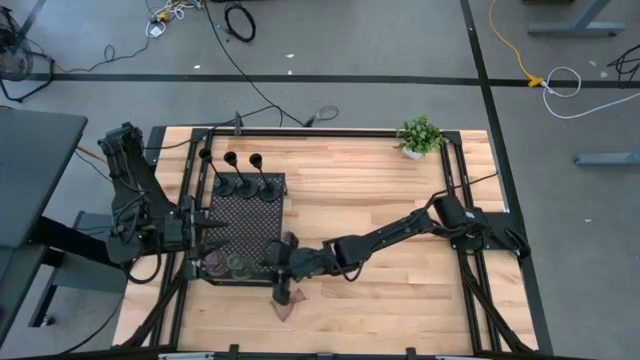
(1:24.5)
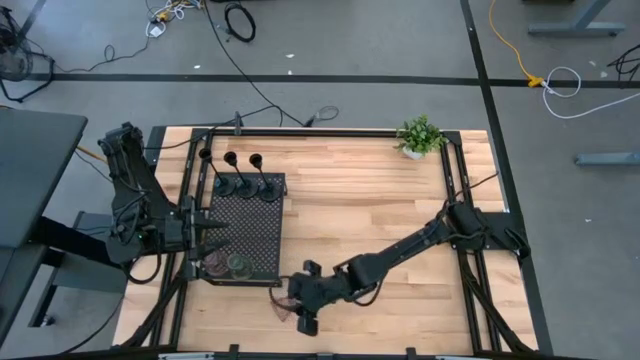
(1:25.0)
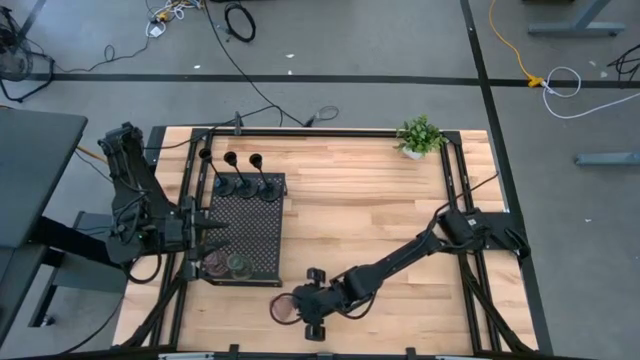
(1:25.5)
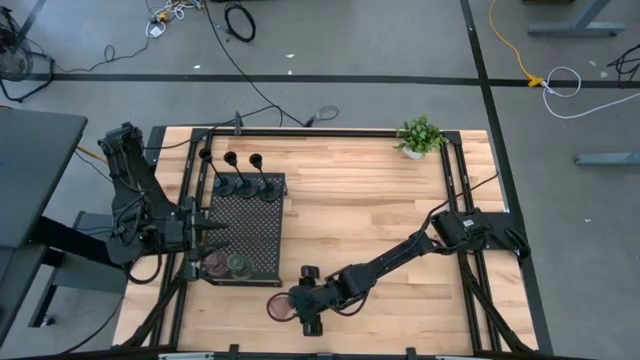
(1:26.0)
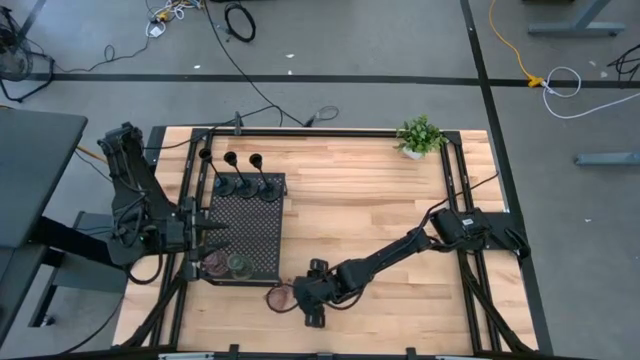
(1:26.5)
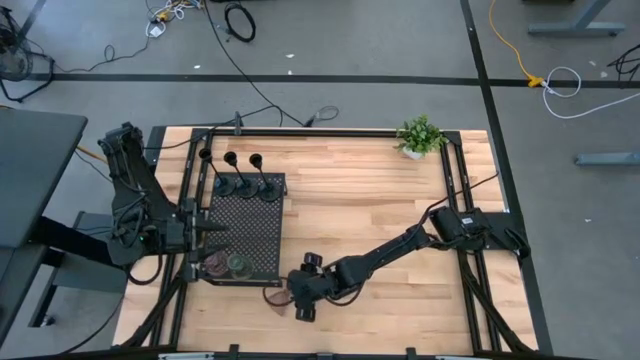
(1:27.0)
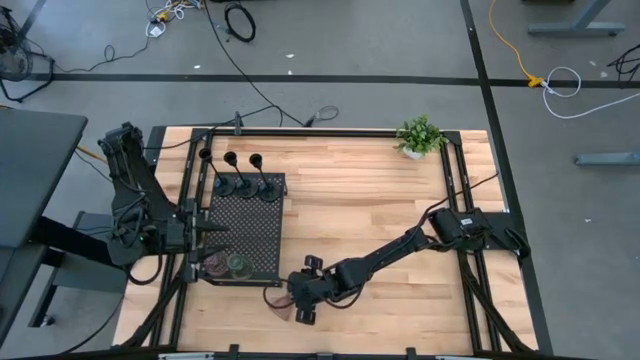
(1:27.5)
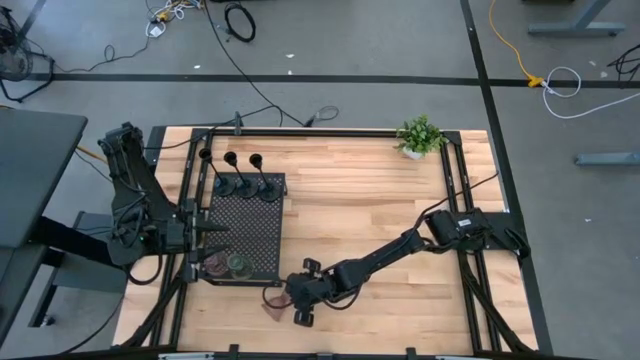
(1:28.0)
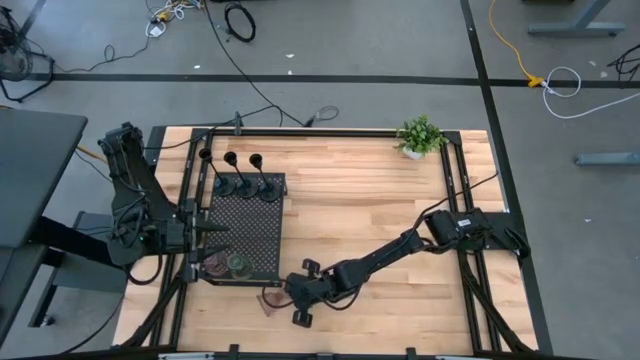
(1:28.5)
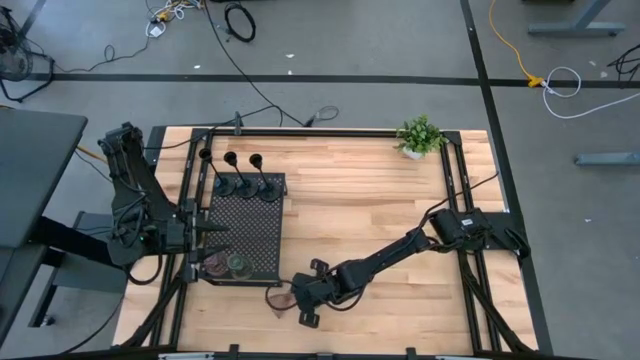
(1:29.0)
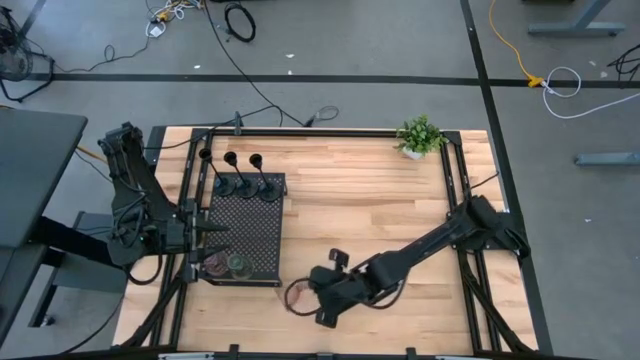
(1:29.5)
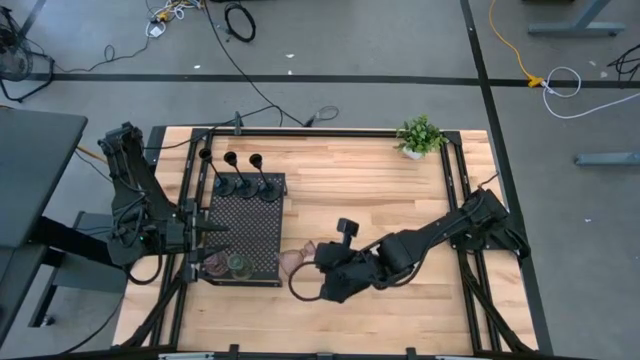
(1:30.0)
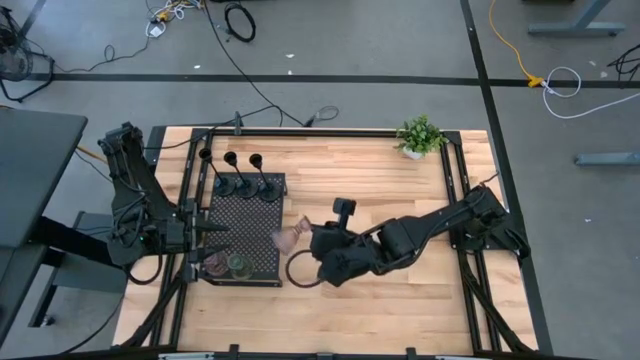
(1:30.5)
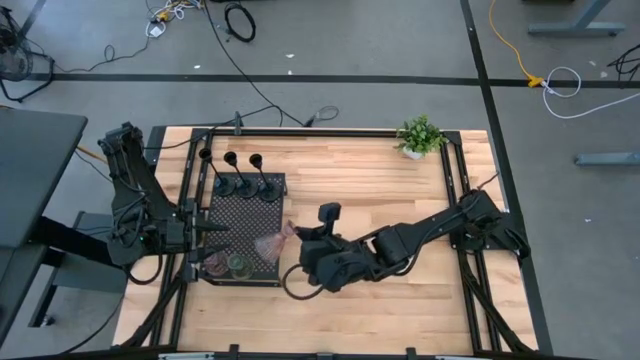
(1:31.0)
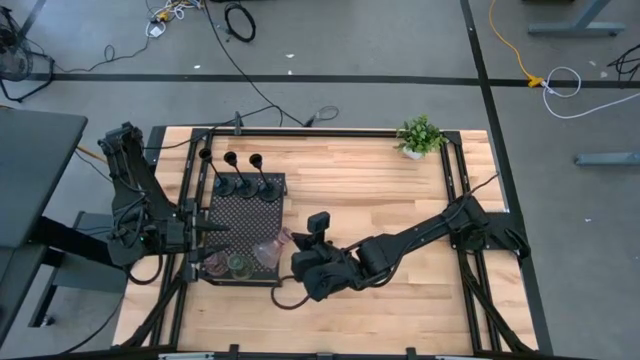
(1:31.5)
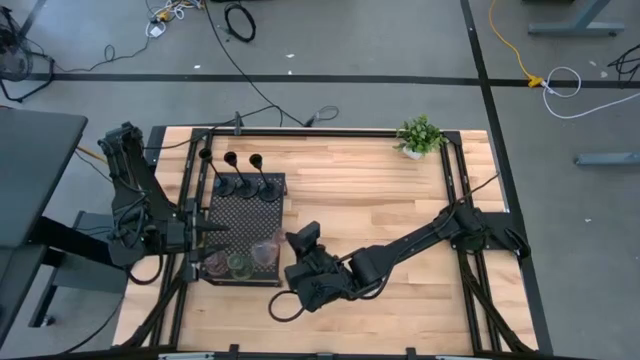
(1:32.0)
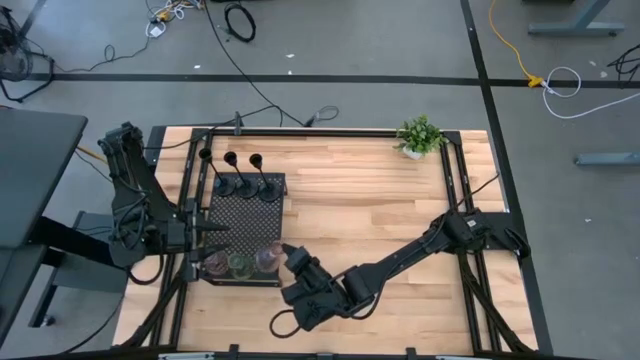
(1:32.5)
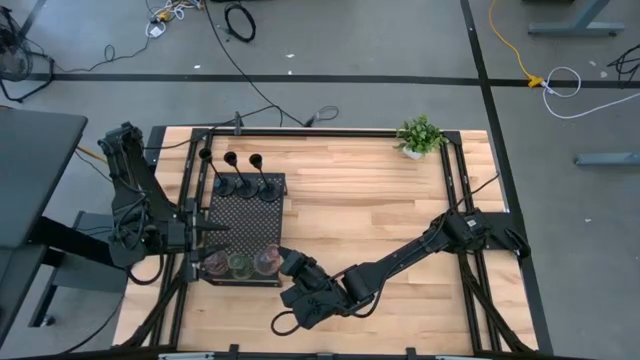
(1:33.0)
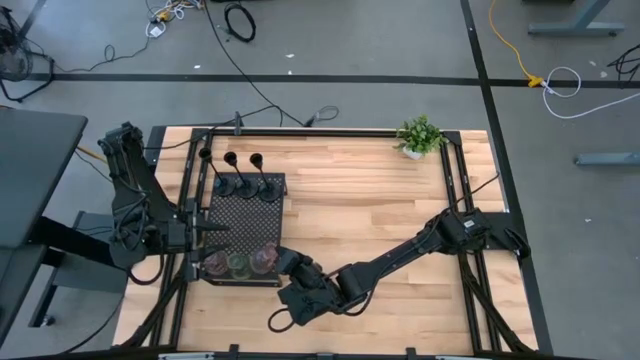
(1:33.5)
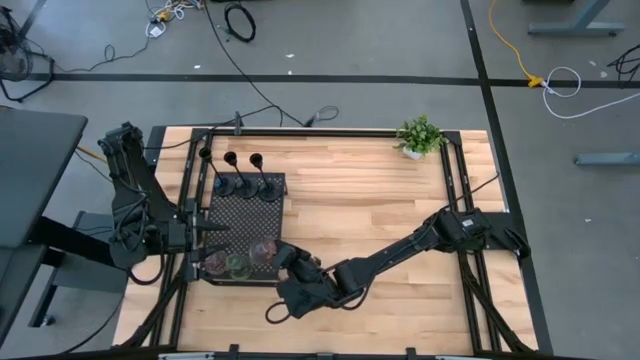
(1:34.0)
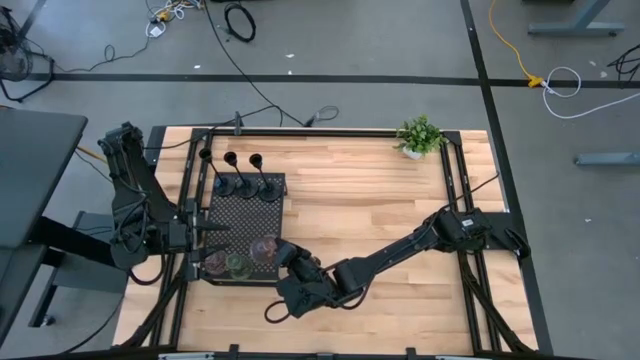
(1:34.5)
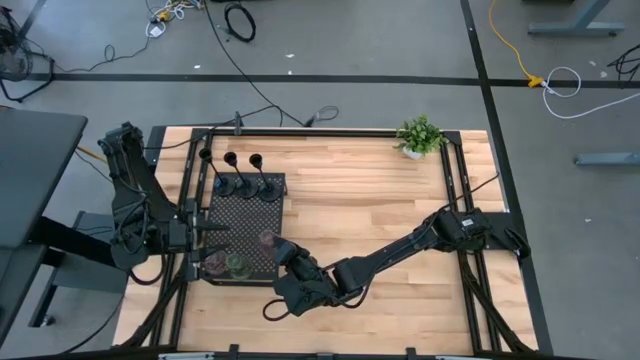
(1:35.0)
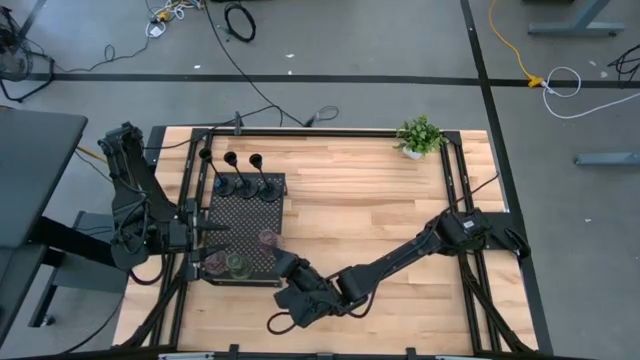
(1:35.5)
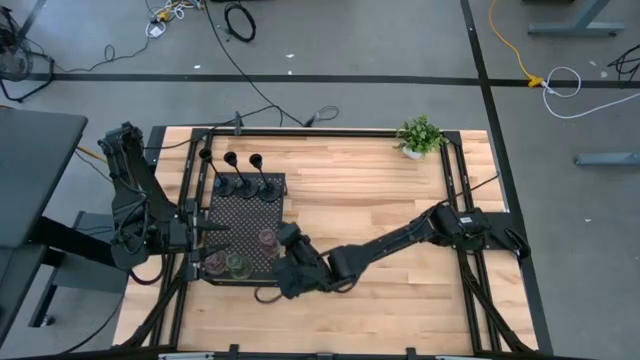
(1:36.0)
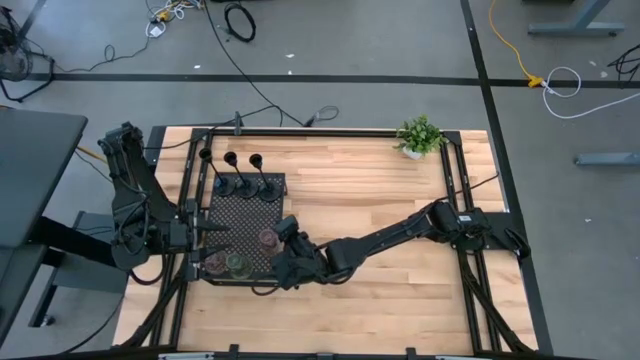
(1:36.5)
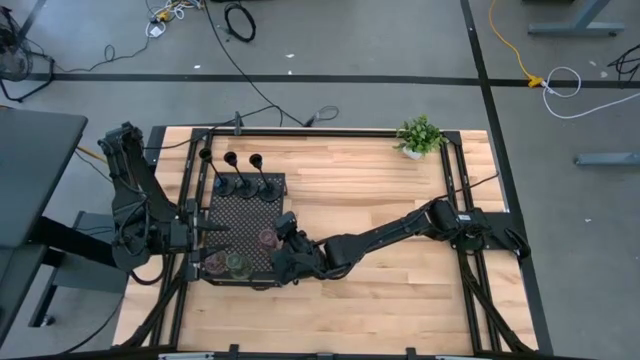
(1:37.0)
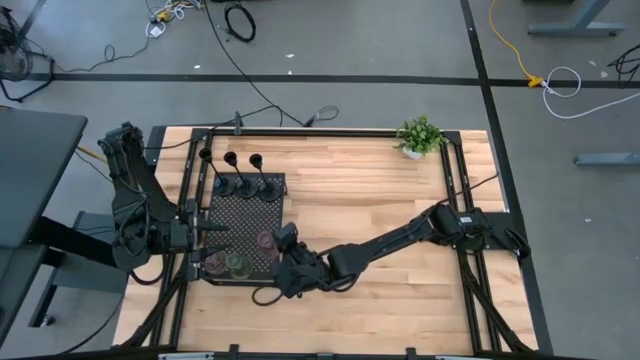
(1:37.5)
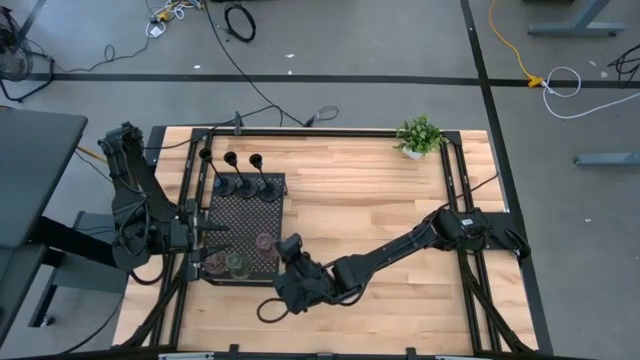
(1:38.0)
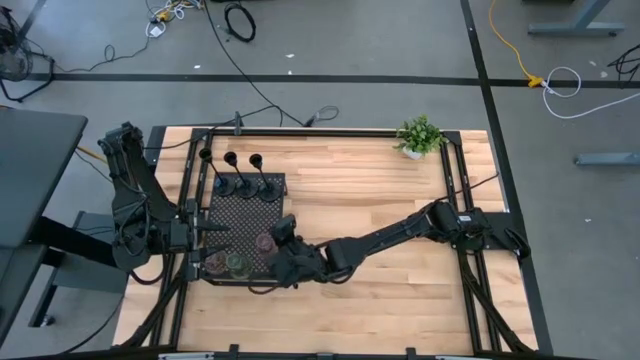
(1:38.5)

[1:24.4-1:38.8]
Task: Pick & Place candle stick holders
Put the pink glass candle holder on the shelf aligned with the pink and green glass candle holders

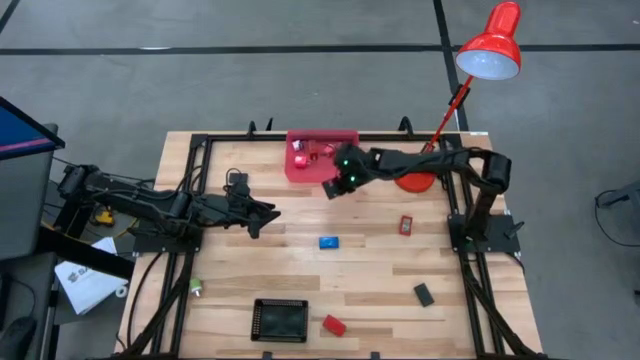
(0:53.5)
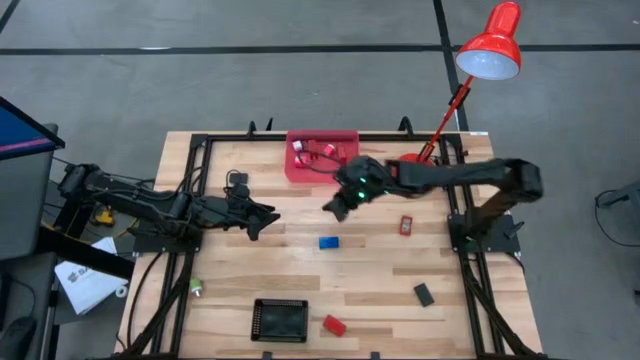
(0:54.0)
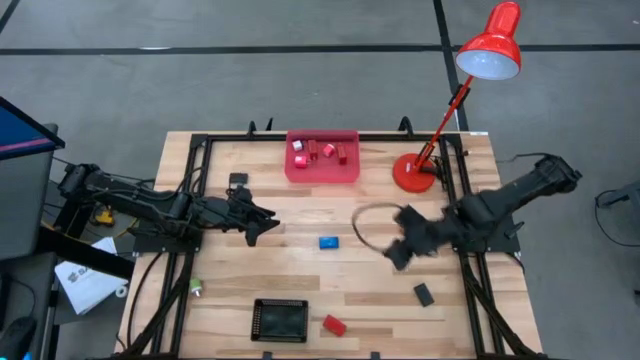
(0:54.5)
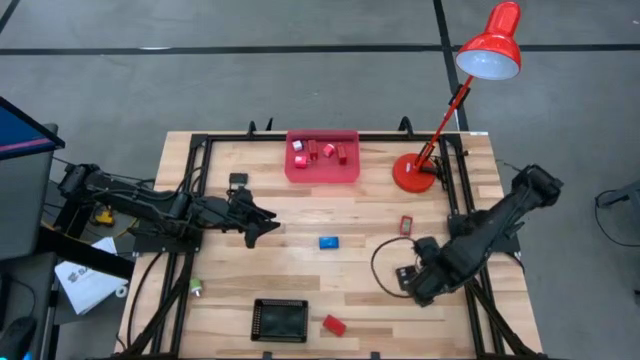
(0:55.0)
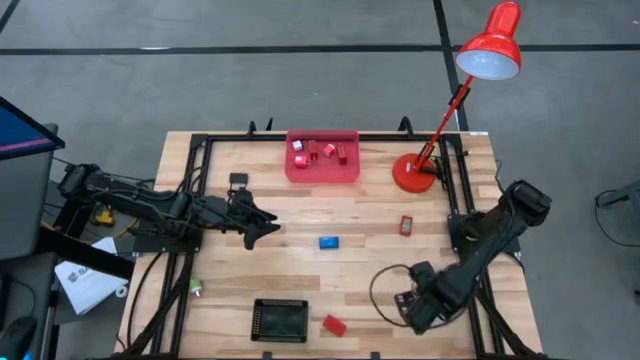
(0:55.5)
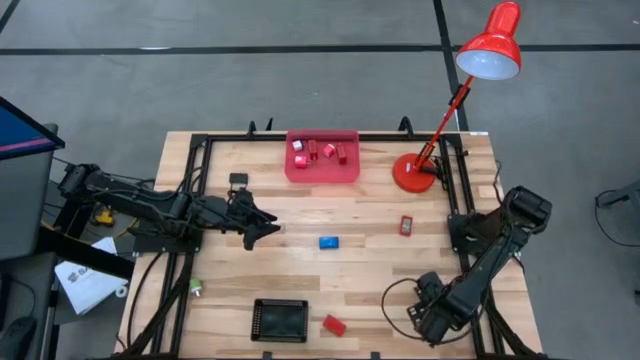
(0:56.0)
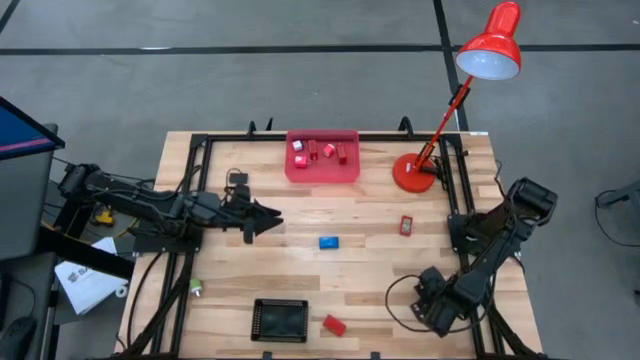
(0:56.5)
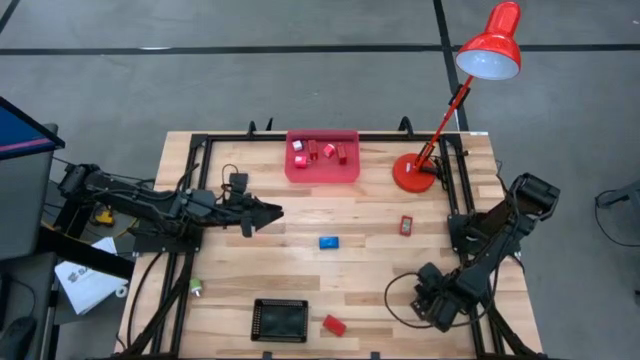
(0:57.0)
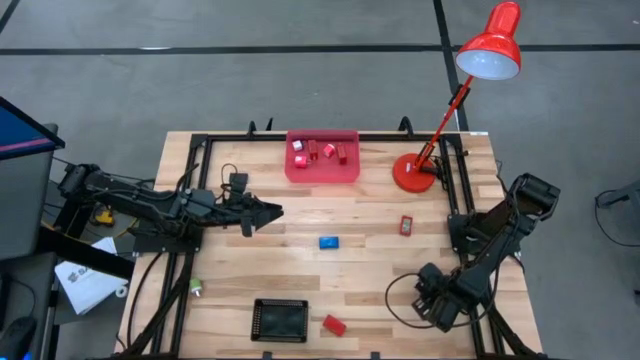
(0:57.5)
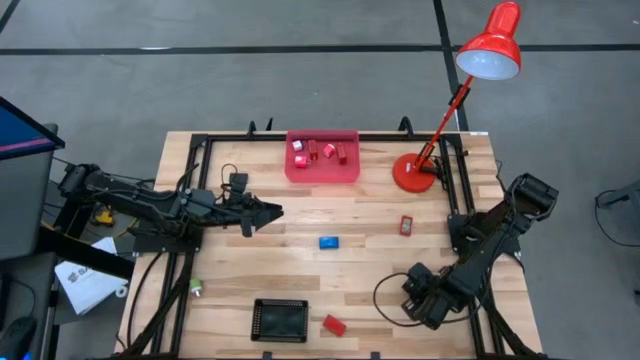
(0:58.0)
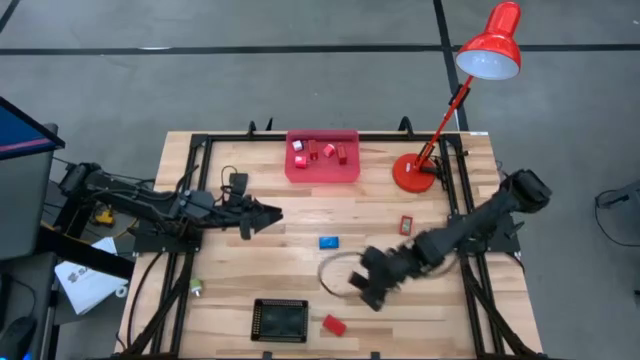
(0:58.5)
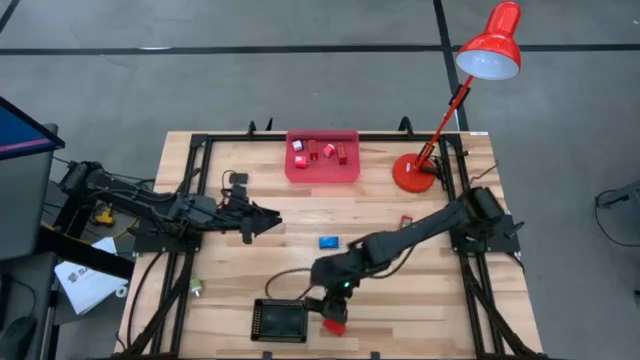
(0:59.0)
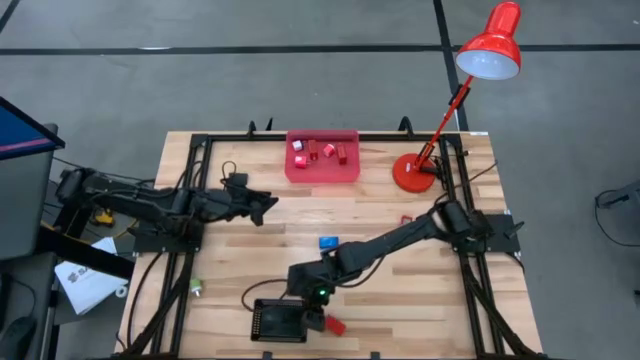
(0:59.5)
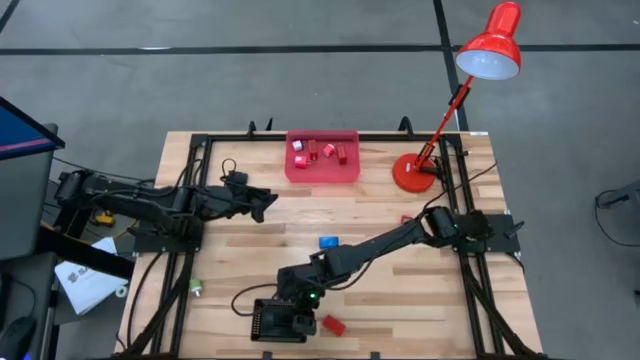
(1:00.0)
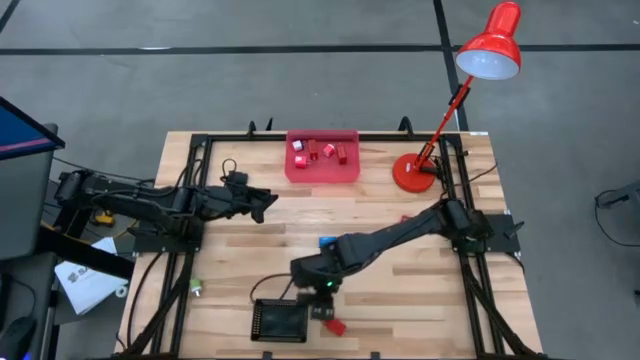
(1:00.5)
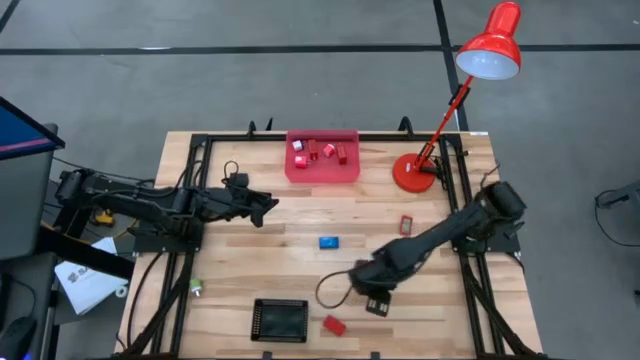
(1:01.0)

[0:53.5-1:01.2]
Task: Pick & Place Office items
Put the green and white charger adapter into the pink bin
